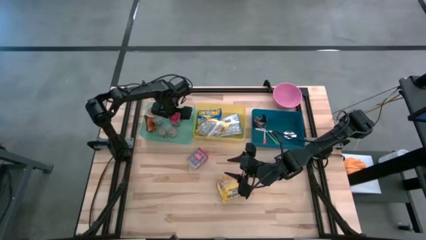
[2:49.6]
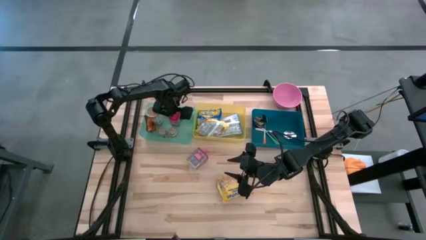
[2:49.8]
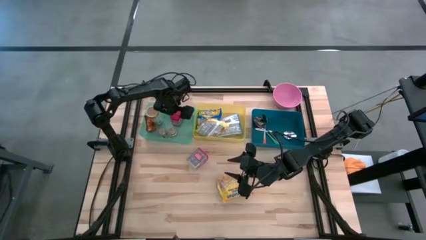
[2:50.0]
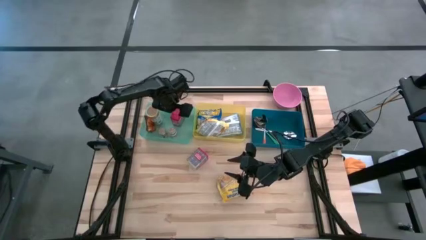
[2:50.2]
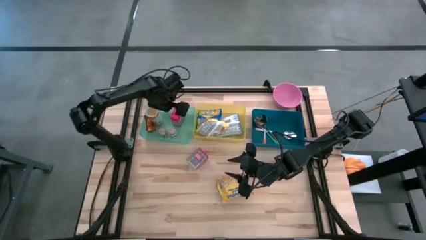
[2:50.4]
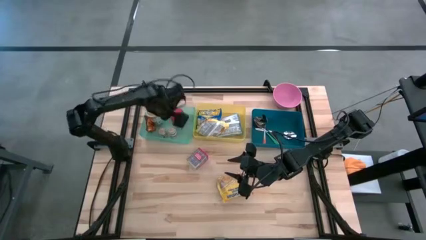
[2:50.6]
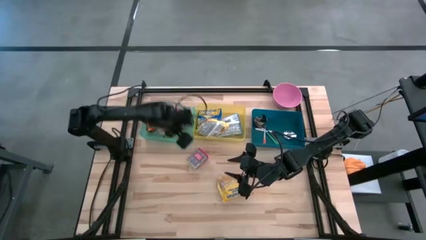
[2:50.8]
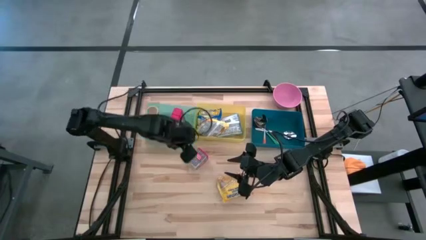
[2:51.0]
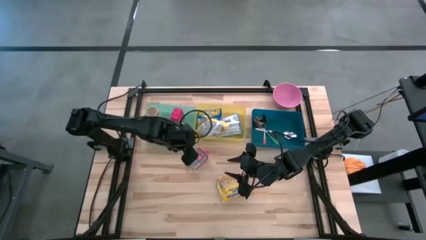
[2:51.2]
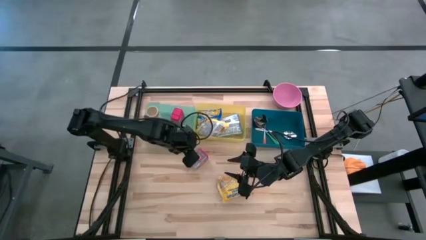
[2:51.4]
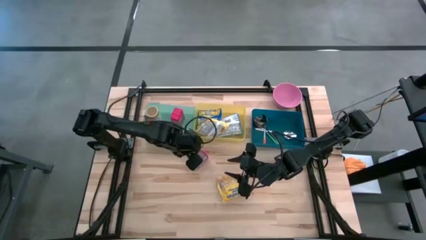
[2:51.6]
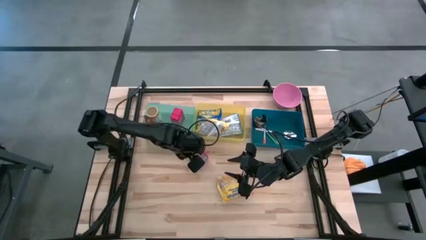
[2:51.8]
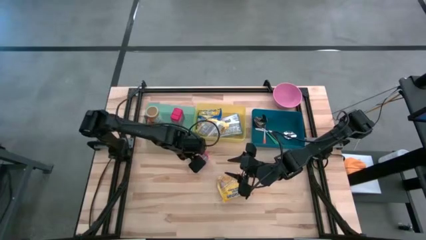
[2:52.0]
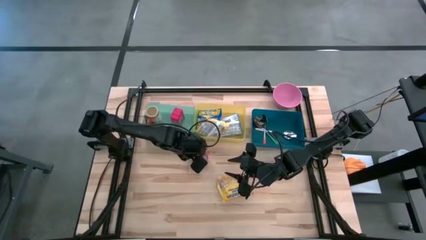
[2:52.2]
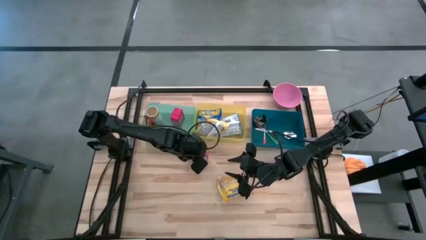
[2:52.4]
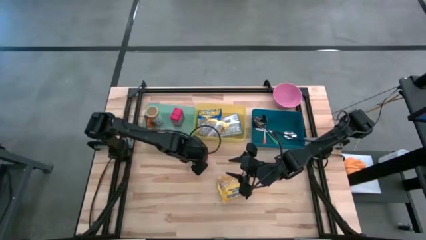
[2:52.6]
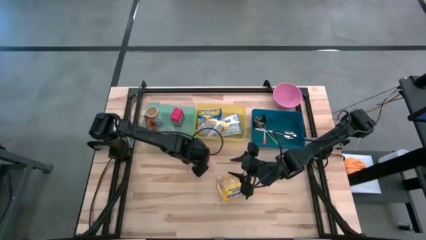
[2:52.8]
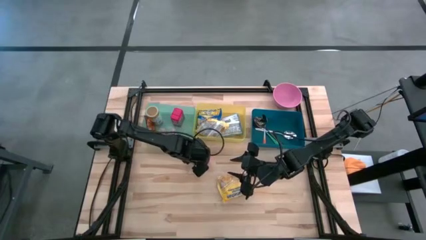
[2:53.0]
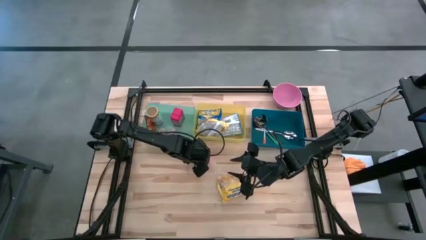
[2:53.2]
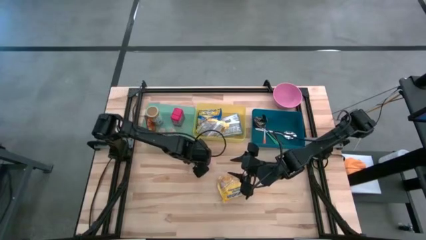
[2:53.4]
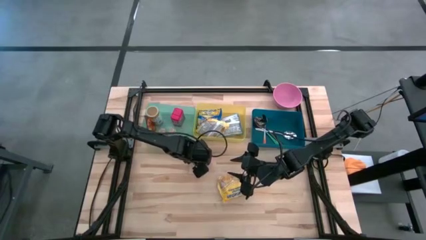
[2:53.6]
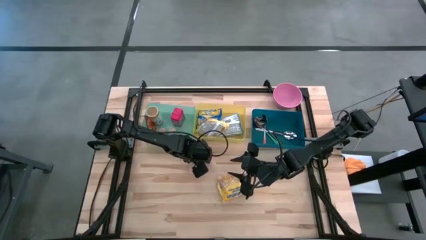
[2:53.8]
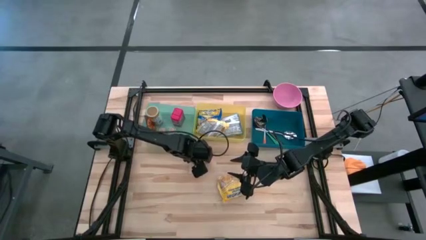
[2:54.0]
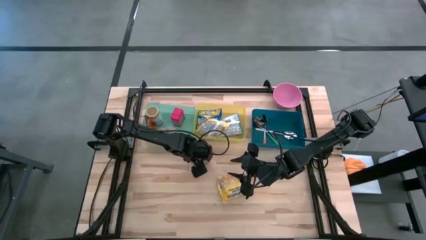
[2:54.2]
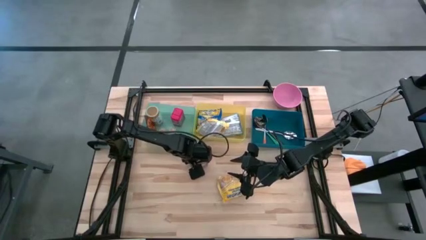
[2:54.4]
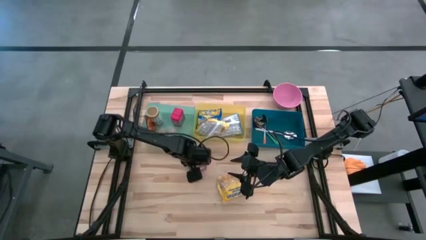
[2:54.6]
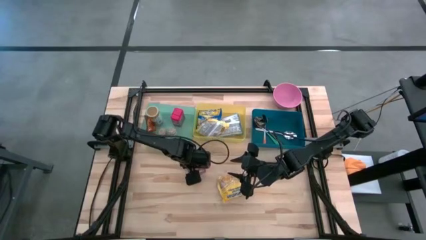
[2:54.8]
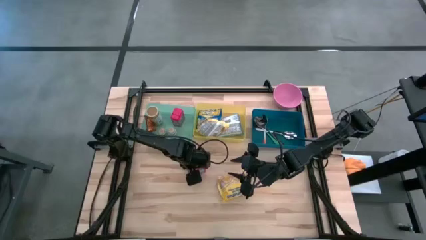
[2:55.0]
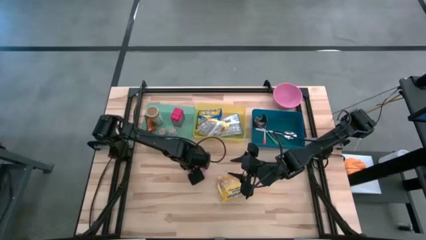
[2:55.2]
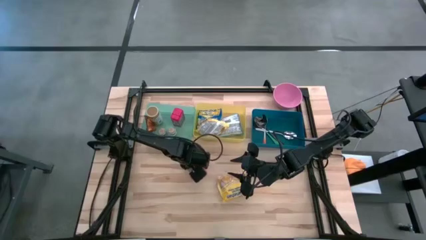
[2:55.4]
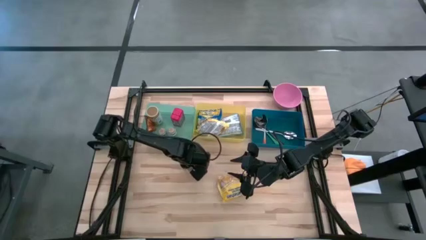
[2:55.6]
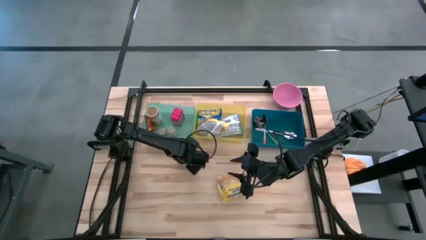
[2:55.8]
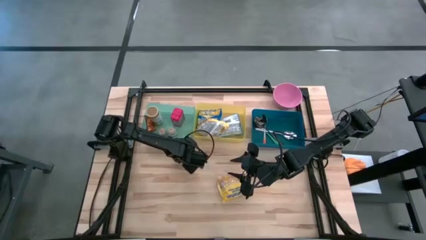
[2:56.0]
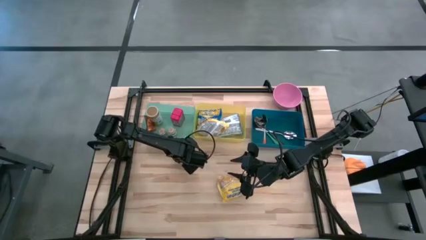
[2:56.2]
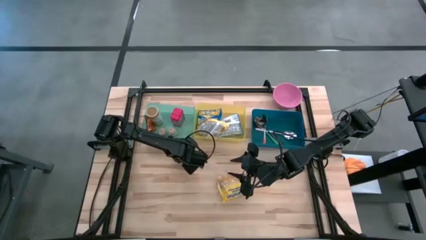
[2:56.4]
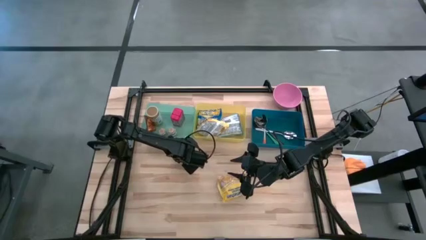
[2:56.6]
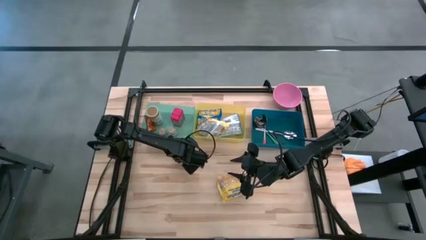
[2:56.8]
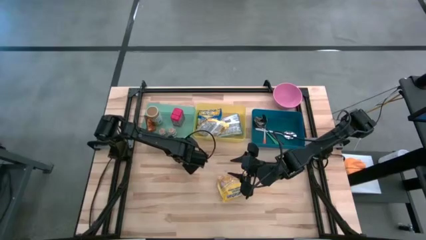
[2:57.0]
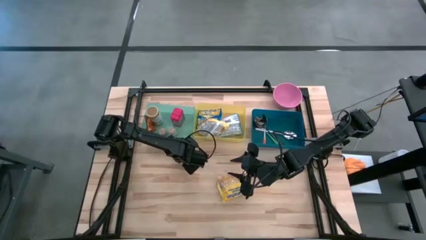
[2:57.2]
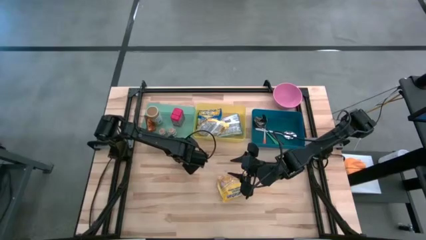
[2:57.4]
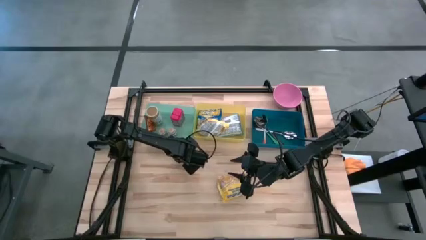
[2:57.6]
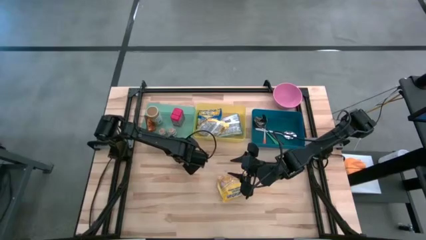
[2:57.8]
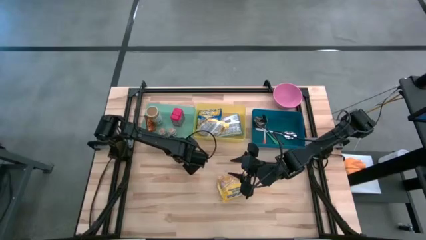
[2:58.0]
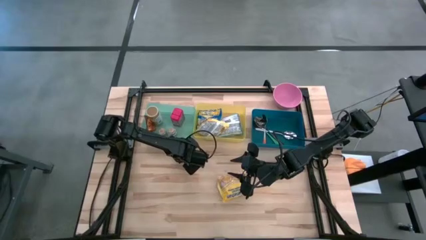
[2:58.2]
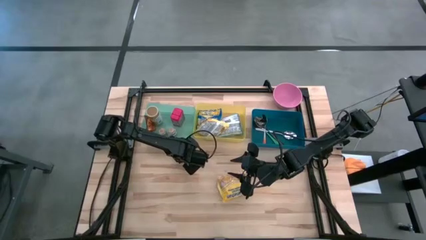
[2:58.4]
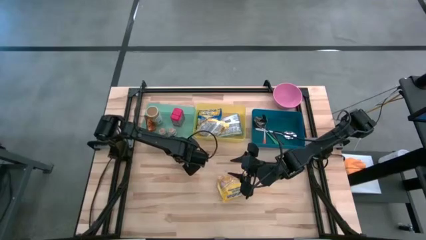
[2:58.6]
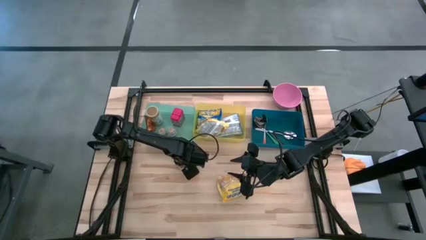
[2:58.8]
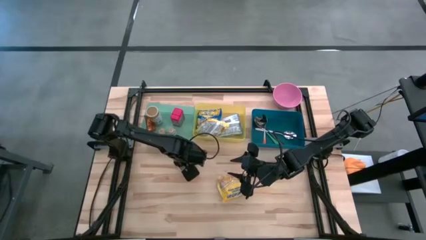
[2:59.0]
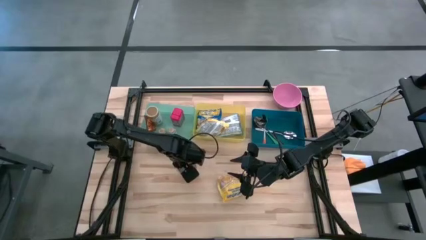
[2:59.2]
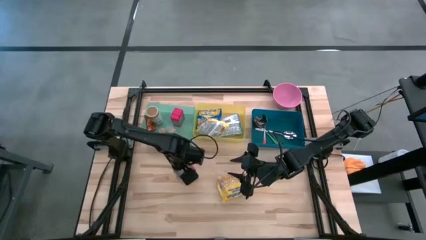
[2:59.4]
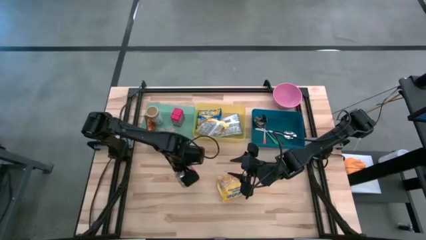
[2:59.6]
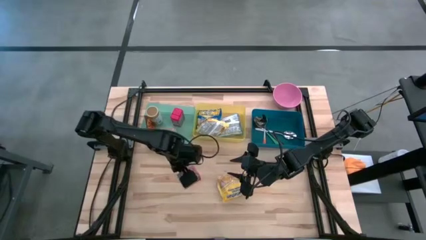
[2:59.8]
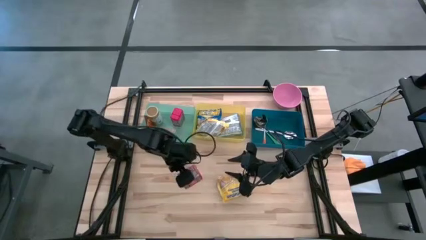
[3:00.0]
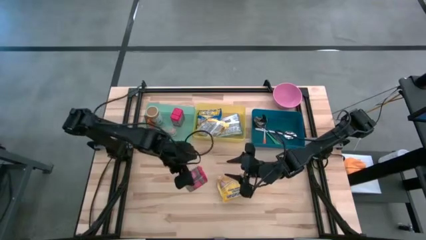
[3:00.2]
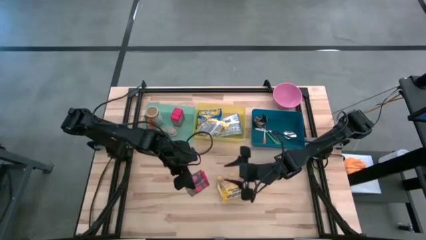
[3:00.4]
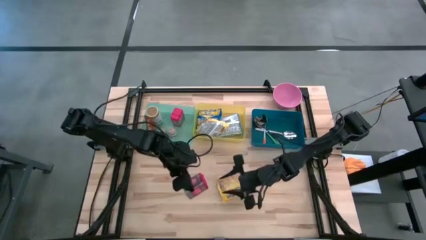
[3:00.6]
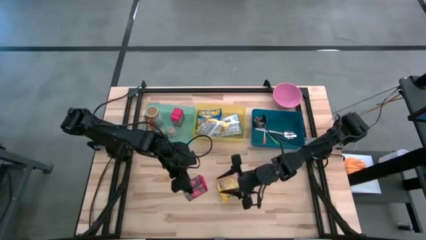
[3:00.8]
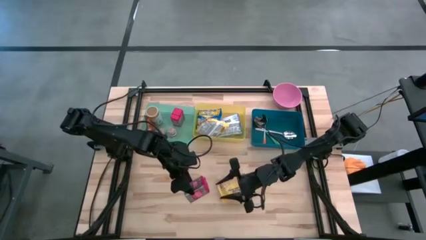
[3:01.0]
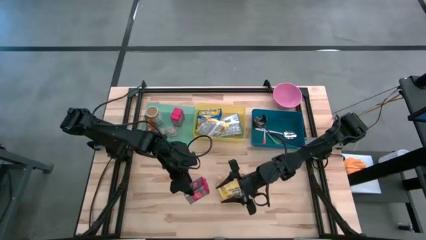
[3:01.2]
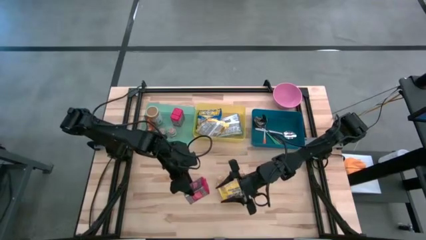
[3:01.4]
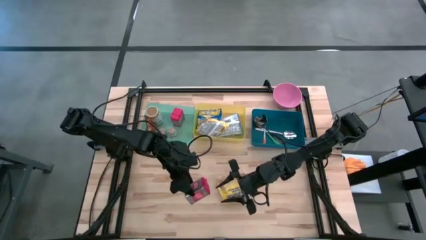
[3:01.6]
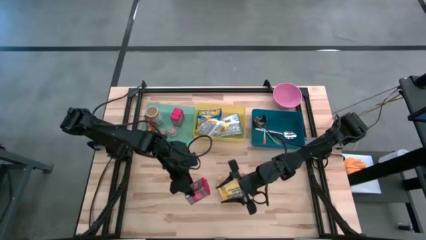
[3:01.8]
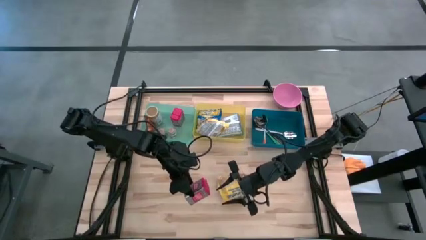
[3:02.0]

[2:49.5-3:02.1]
Put the red seasoning can into the green bin
